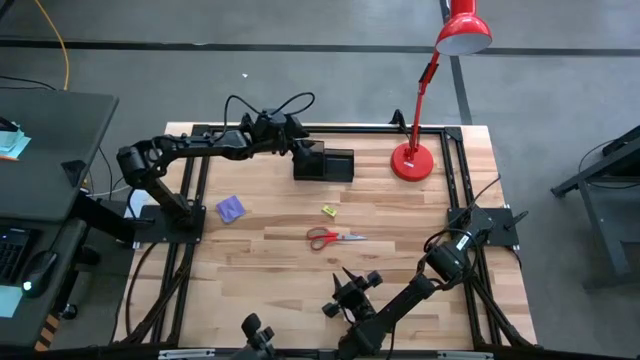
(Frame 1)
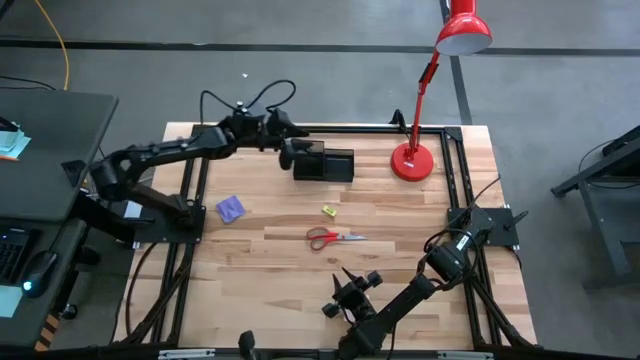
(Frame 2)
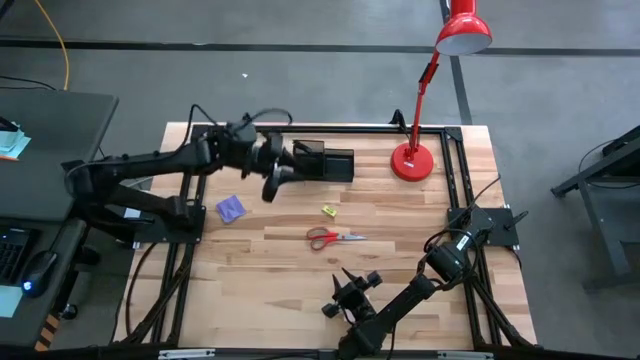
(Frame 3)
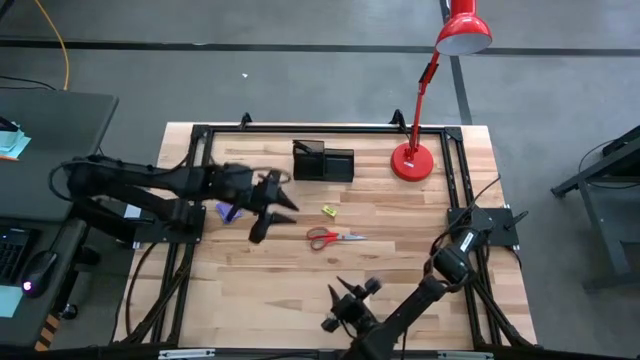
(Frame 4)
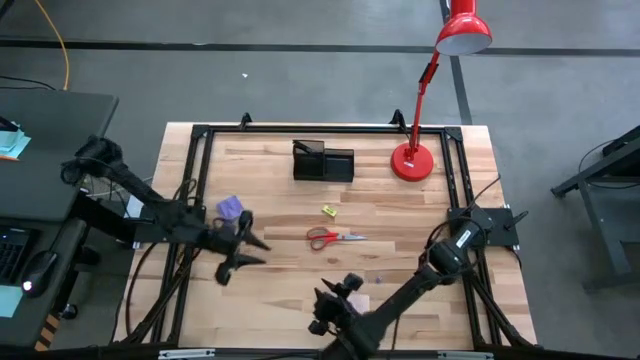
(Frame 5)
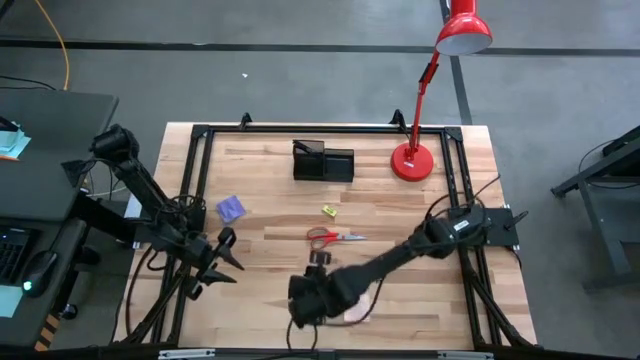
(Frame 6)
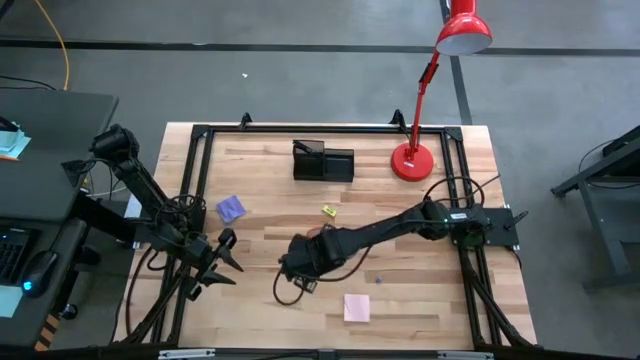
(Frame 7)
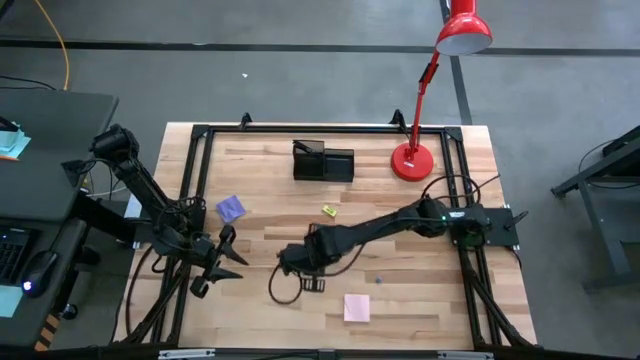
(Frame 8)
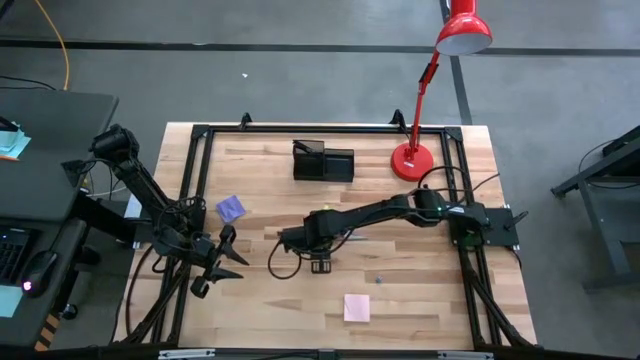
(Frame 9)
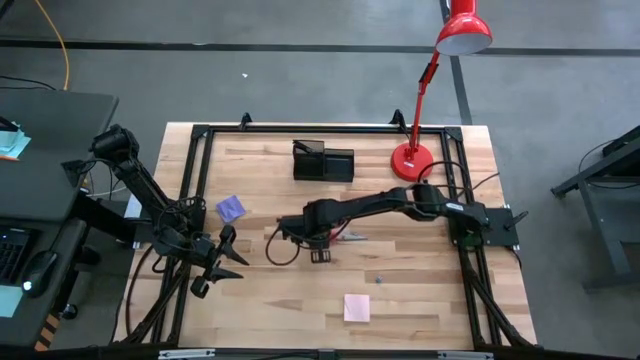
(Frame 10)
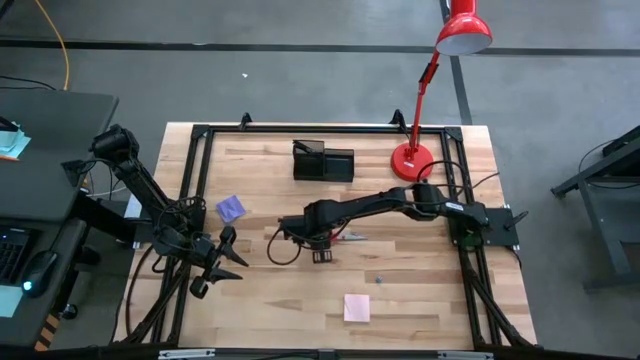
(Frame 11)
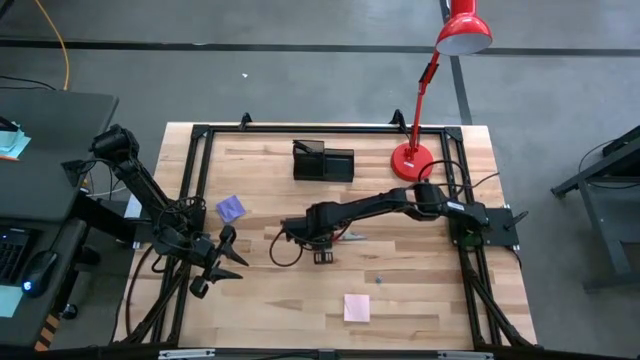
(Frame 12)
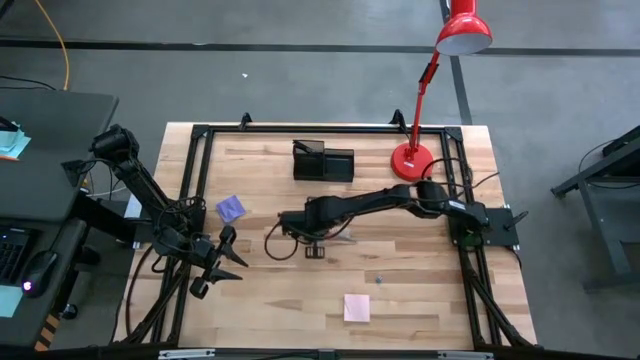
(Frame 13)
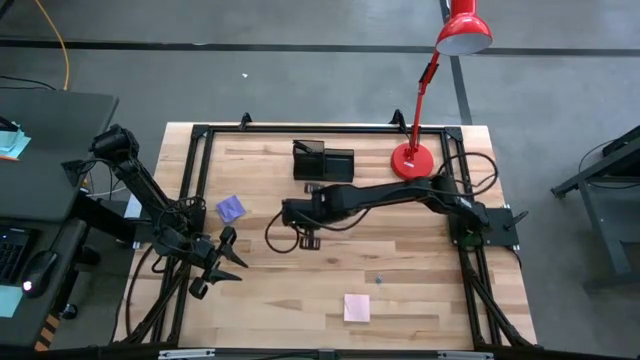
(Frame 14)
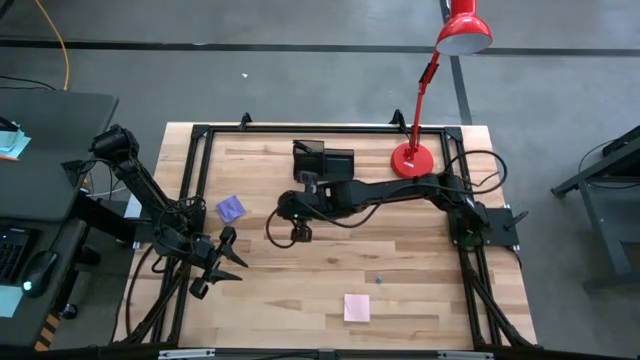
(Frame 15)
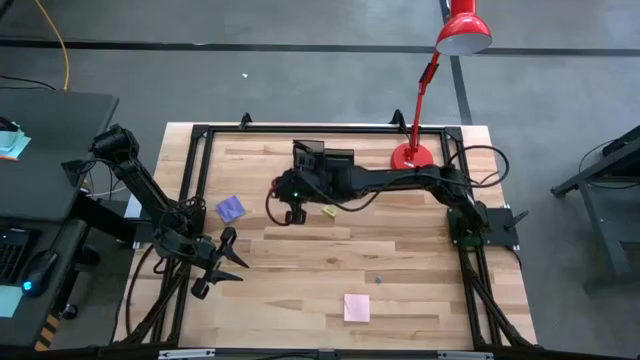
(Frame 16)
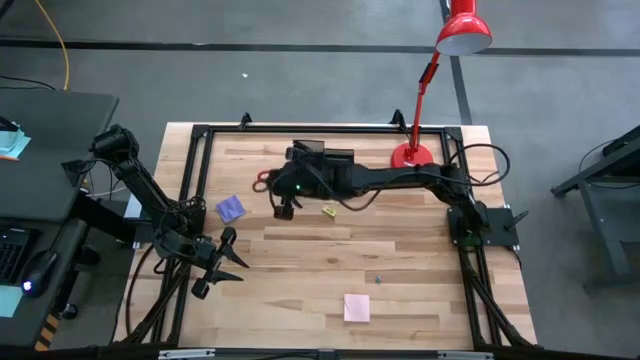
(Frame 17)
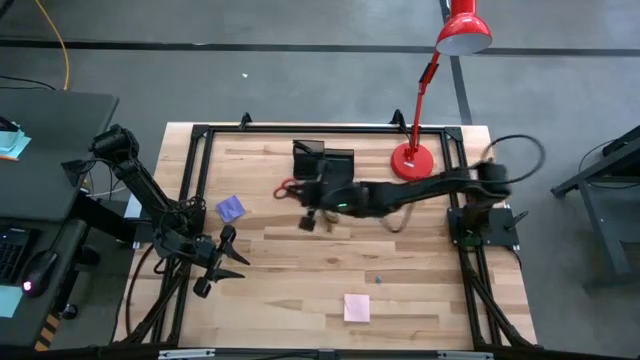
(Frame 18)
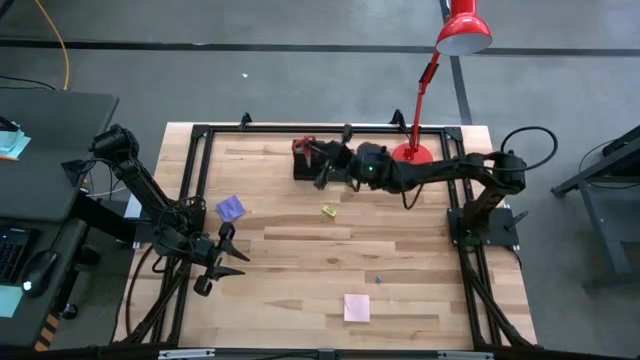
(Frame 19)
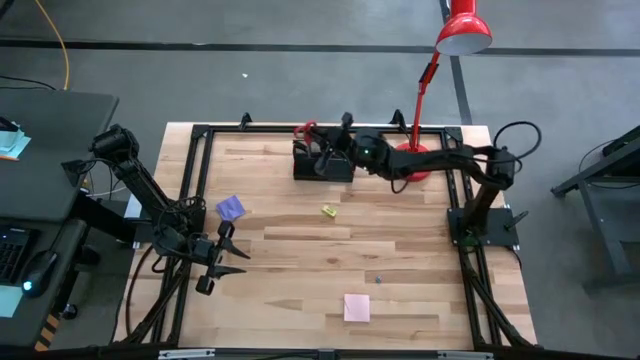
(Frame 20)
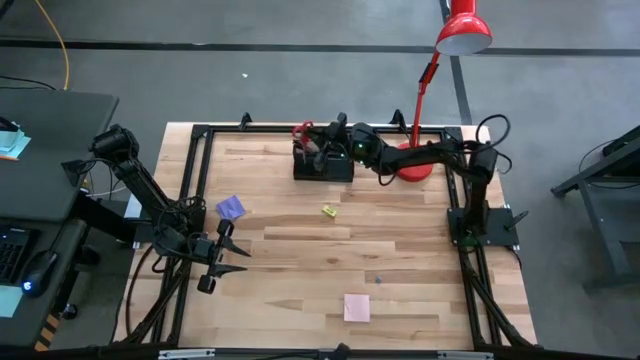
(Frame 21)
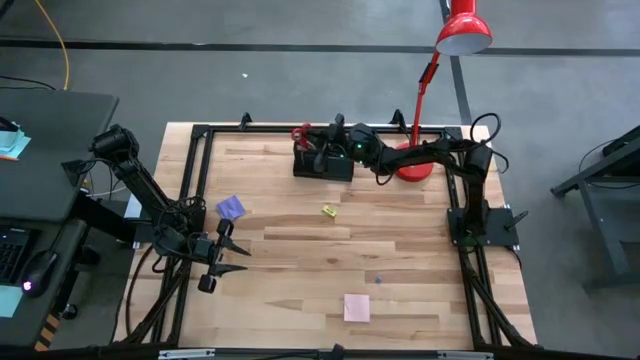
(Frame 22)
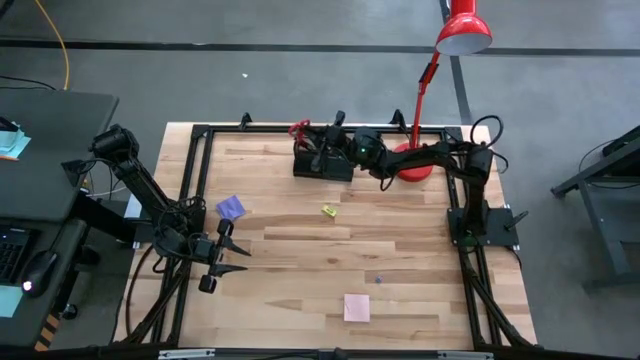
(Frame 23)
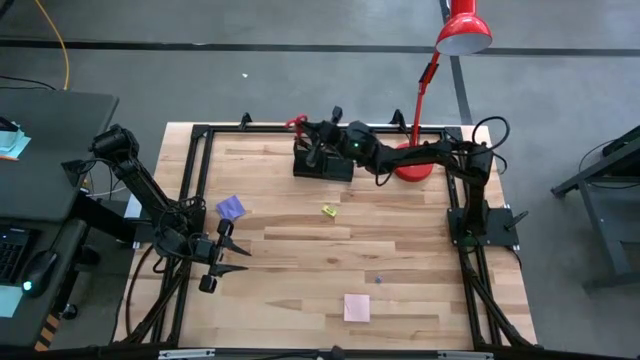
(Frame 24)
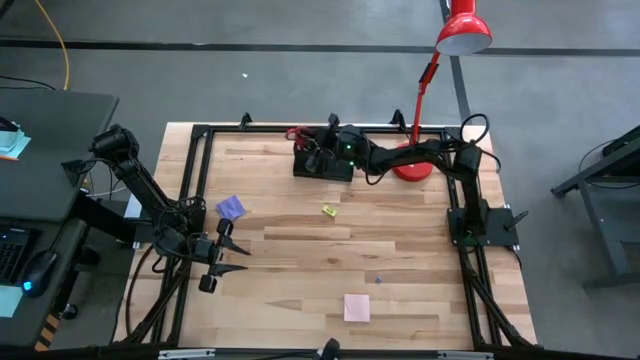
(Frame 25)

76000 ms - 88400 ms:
Task: Pick and place office supplies into organizer
Put the orange scissor into the desk organizer

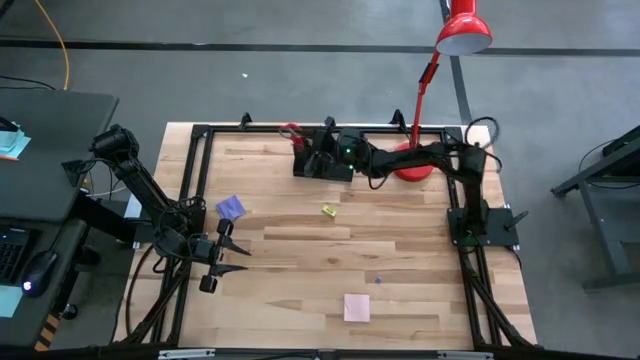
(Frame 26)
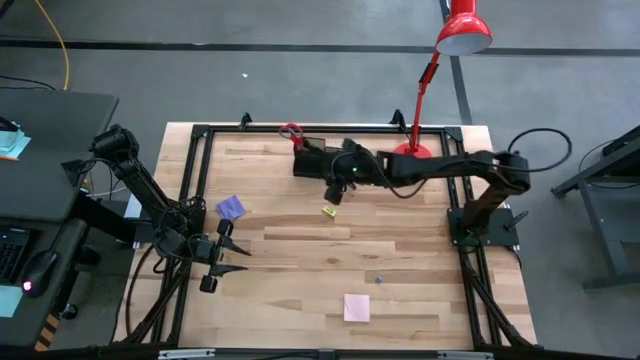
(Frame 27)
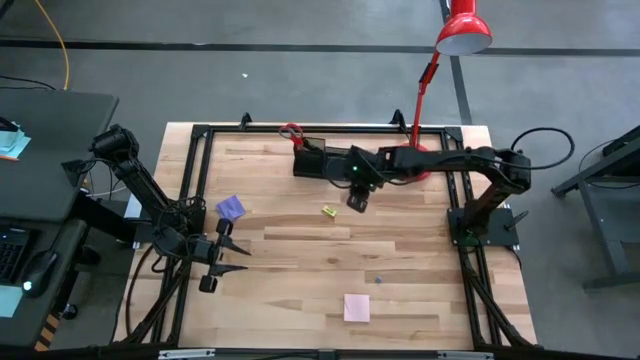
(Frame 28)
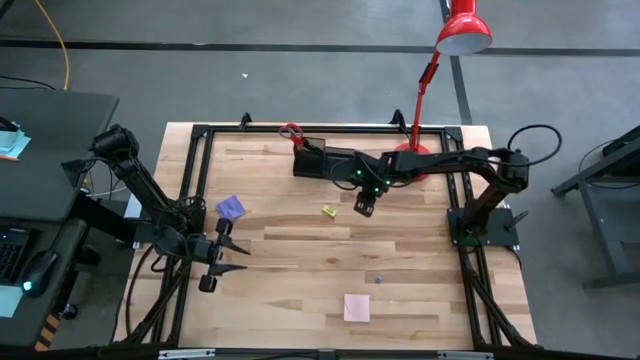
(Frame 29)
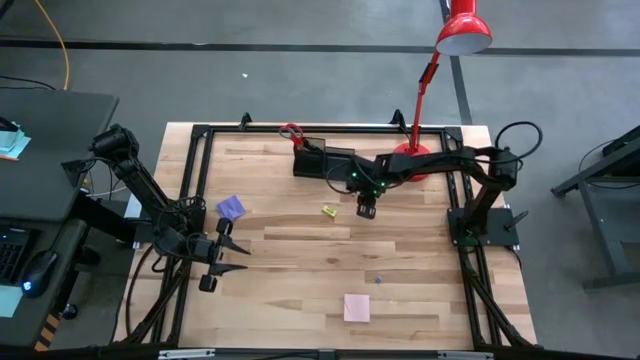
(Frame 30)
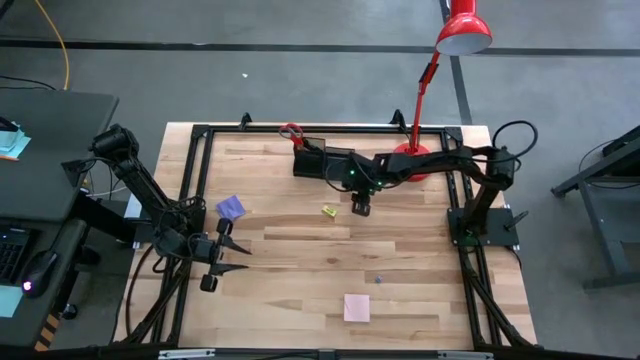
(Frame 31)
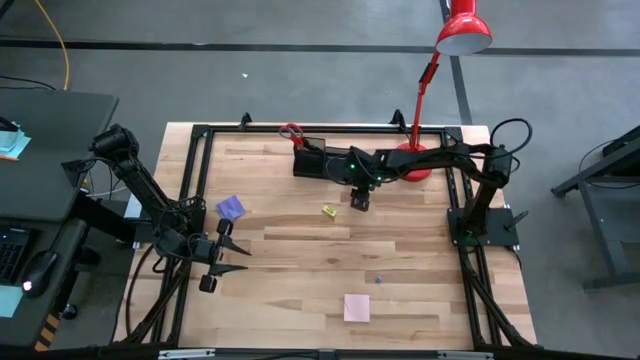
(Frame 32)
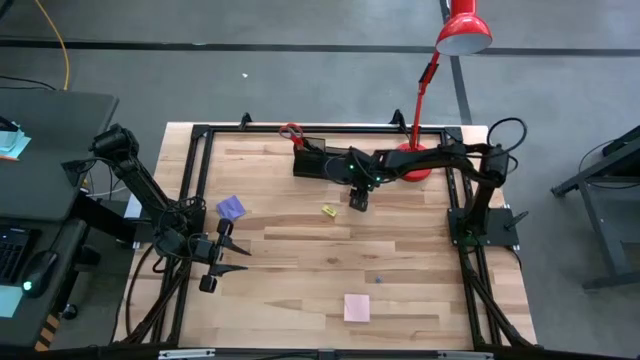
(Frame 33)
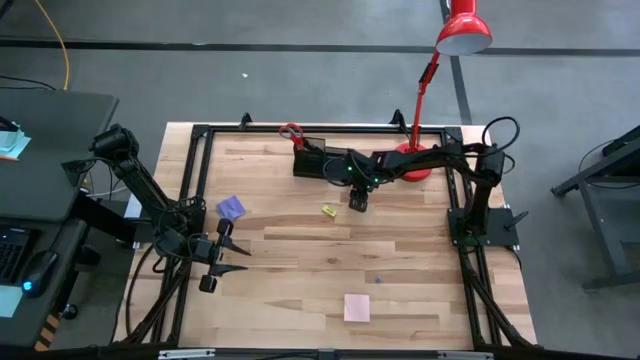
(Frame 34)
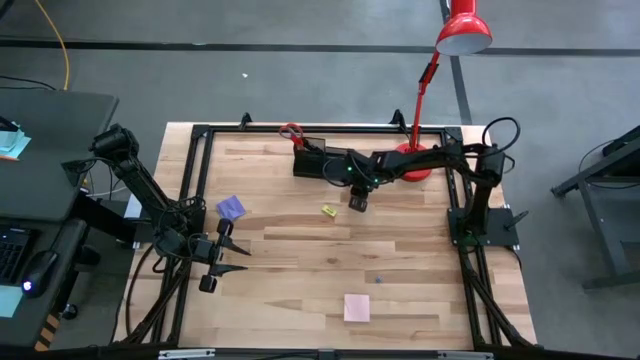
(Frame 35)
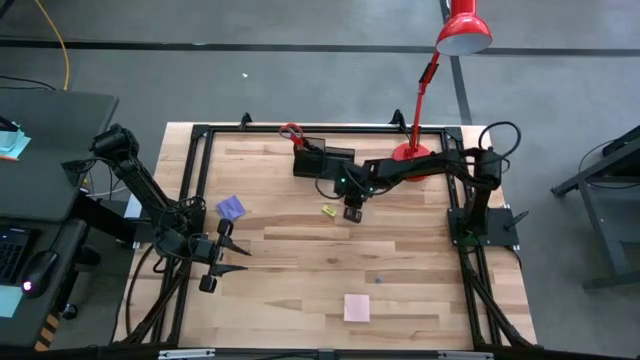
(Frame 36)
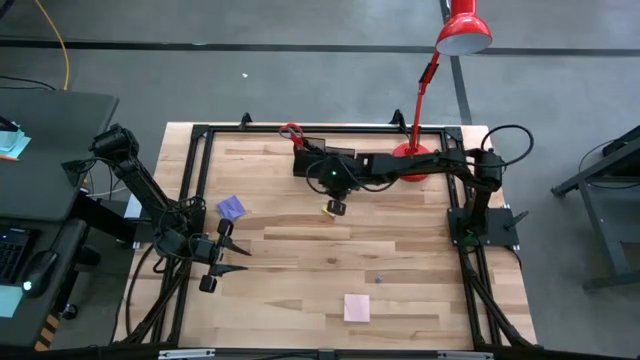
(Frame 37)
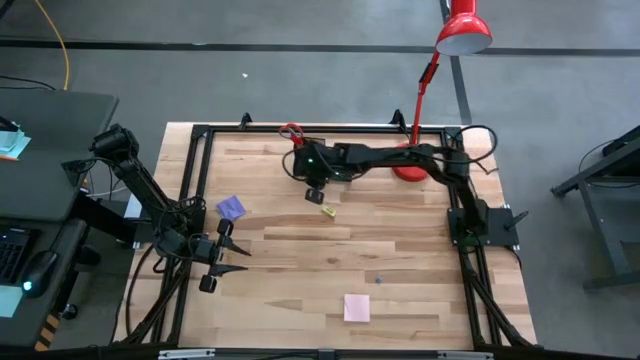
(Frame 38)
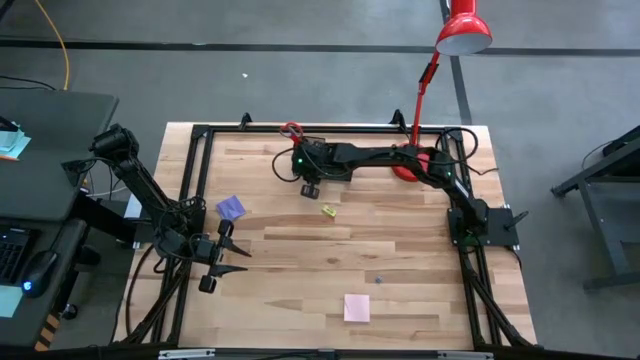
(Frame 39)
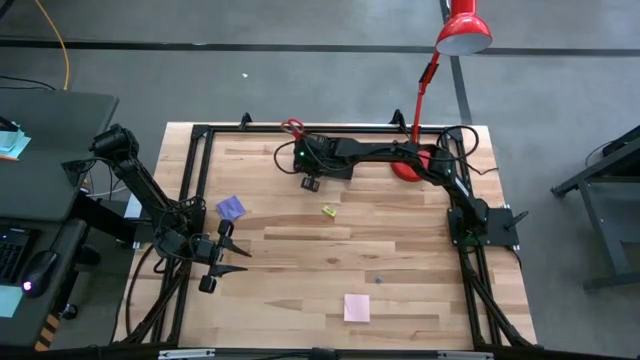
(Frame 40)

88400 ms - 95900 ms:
Put the pink clip bender into the desk organizer

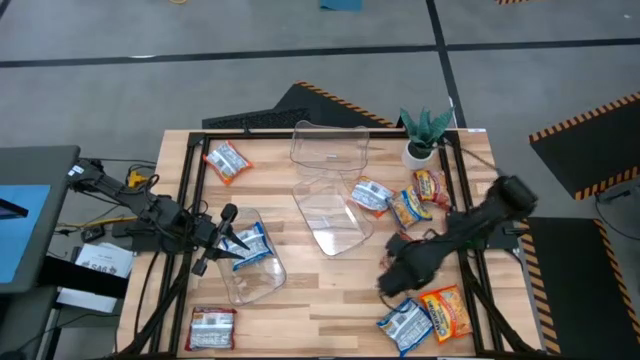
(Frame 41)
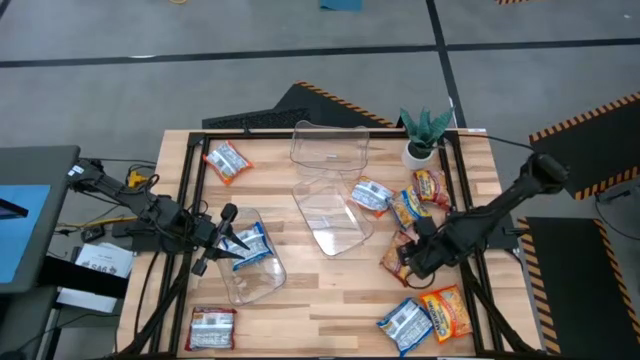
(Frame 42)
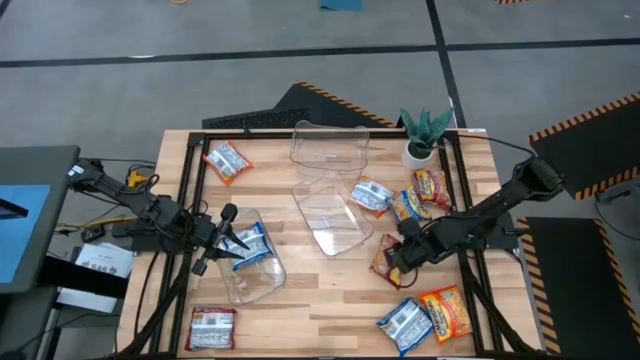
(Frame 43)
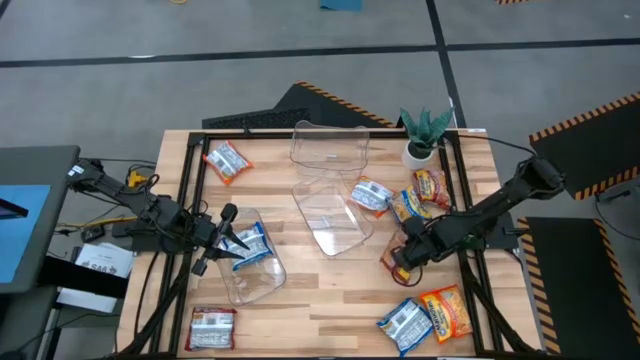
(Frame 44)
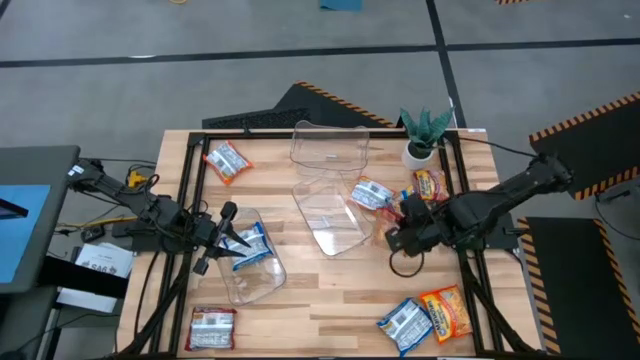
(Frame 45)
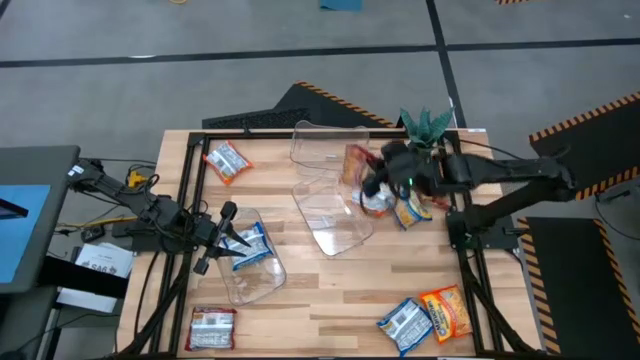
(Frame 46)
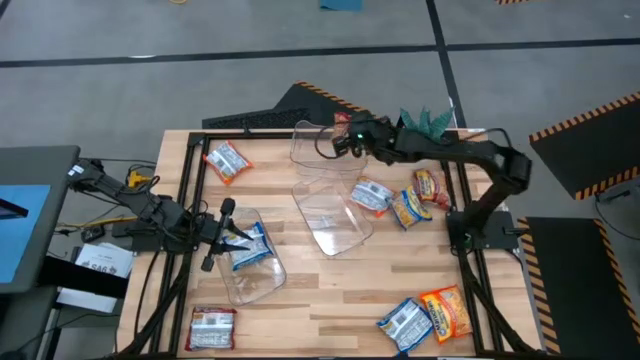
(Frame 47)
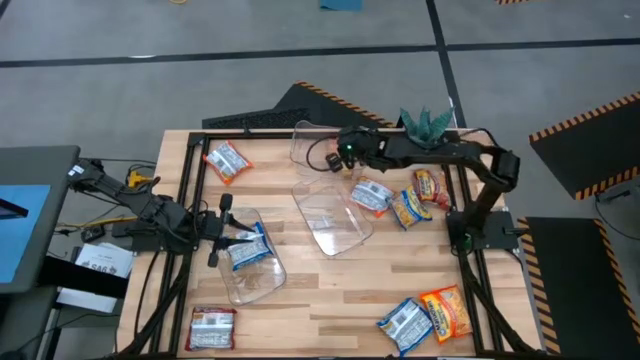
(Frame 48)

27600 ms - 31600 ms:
Task: Sort Maruchan noodles
Put the bottom right red noodle pack into the top transparent bin
